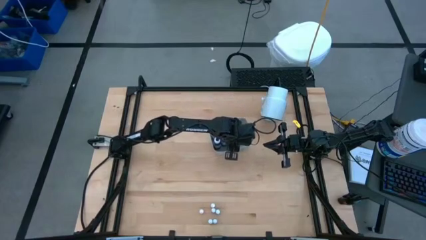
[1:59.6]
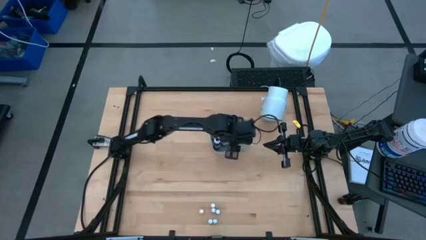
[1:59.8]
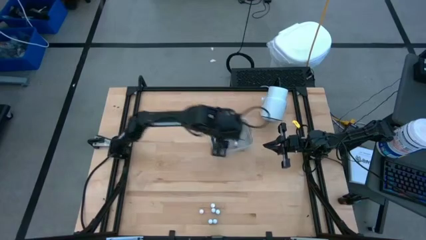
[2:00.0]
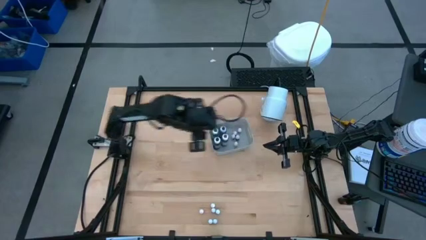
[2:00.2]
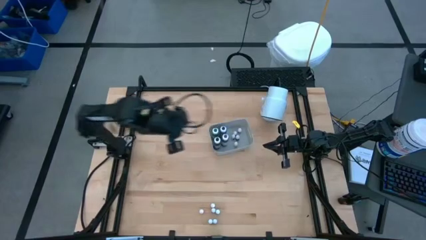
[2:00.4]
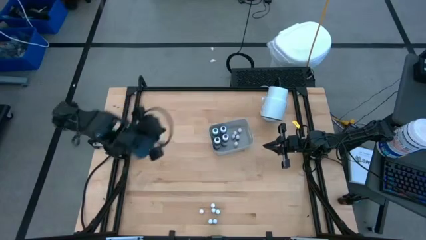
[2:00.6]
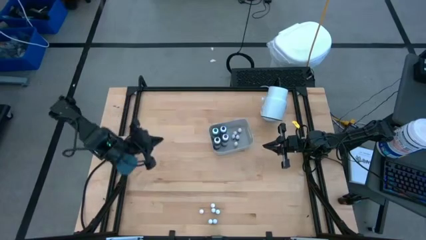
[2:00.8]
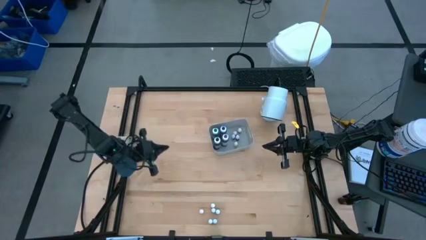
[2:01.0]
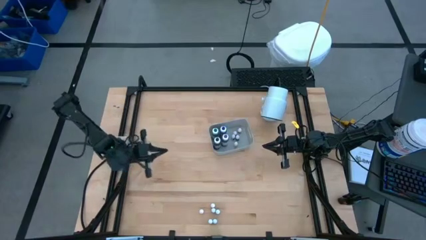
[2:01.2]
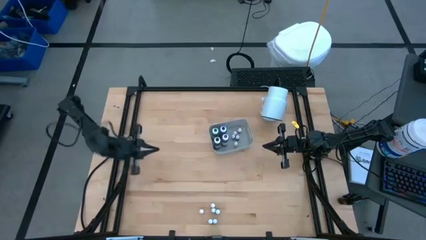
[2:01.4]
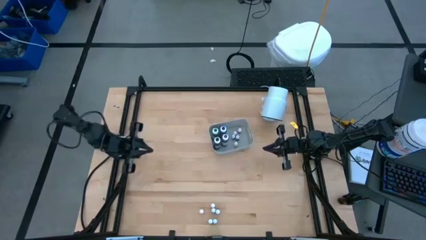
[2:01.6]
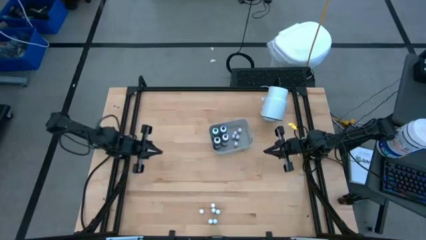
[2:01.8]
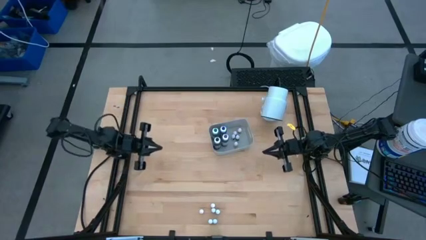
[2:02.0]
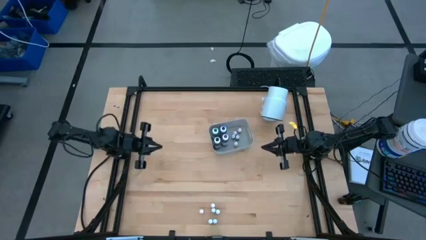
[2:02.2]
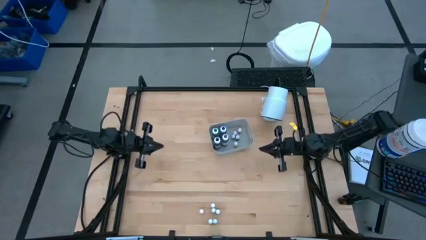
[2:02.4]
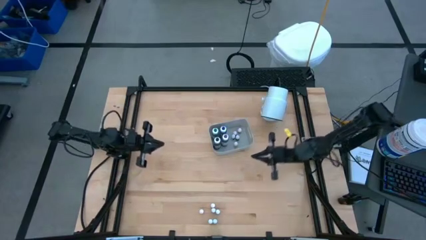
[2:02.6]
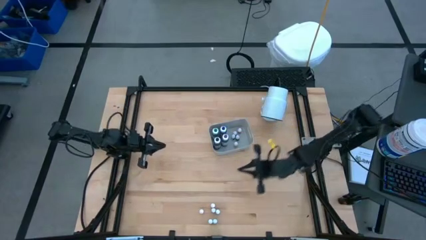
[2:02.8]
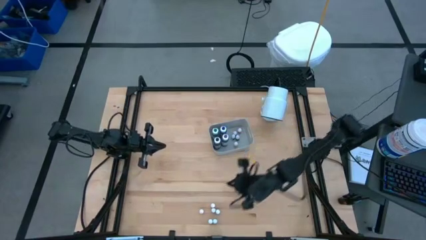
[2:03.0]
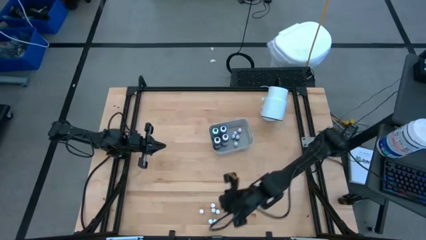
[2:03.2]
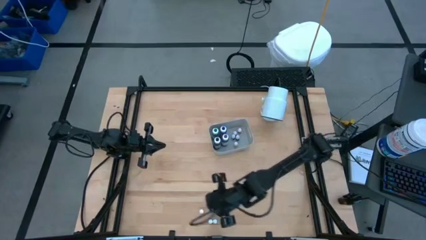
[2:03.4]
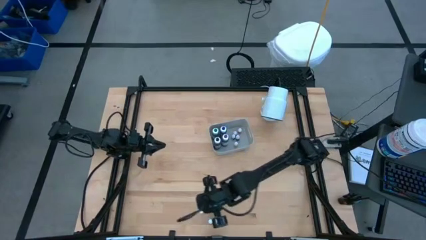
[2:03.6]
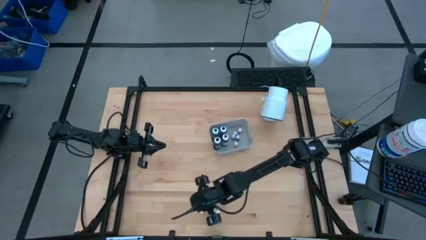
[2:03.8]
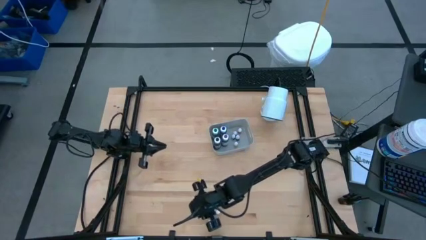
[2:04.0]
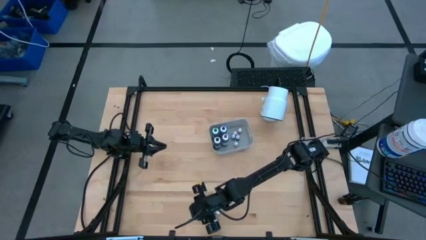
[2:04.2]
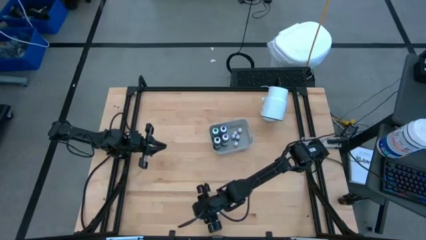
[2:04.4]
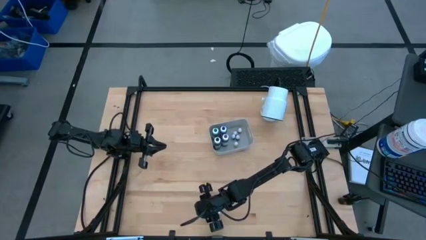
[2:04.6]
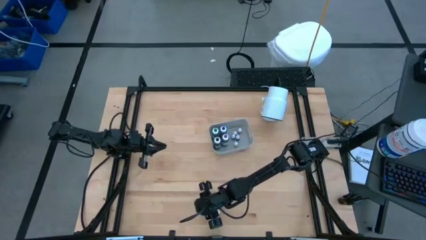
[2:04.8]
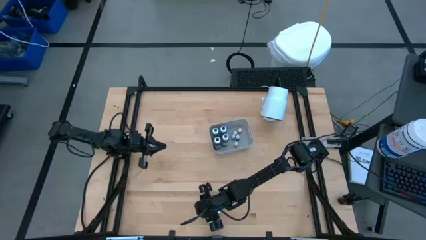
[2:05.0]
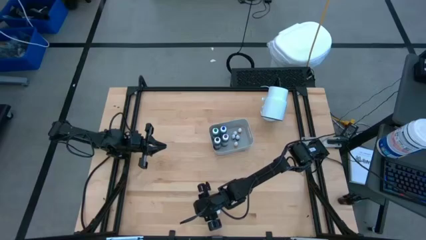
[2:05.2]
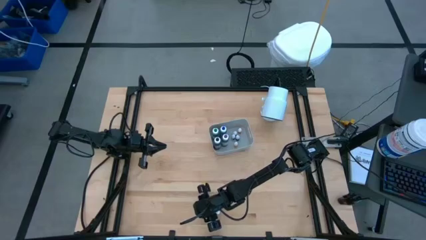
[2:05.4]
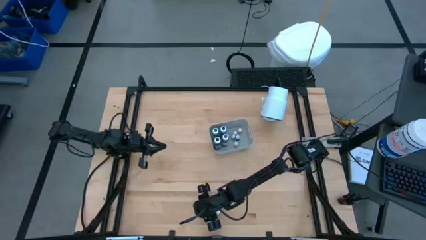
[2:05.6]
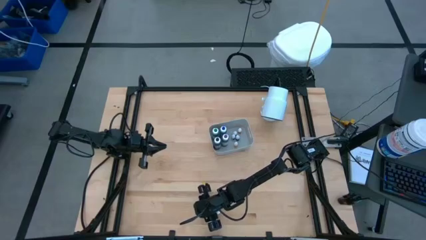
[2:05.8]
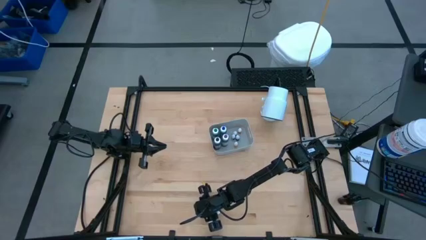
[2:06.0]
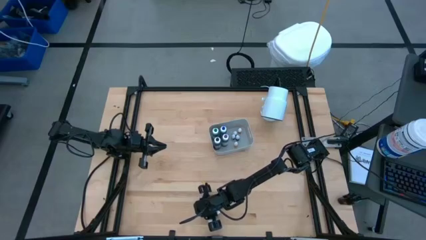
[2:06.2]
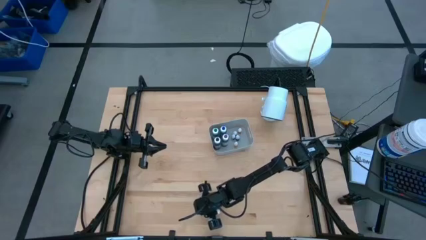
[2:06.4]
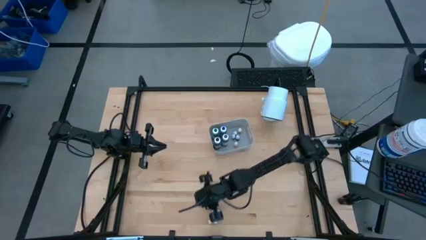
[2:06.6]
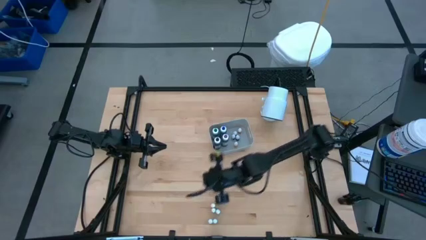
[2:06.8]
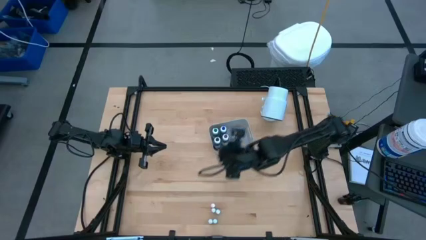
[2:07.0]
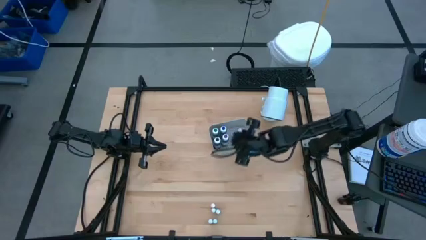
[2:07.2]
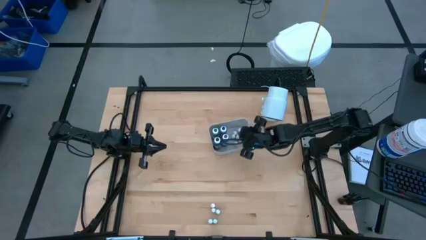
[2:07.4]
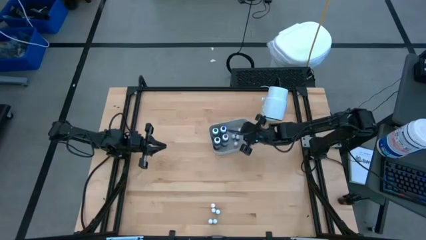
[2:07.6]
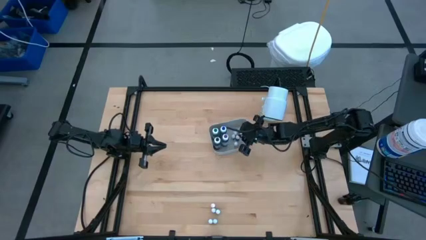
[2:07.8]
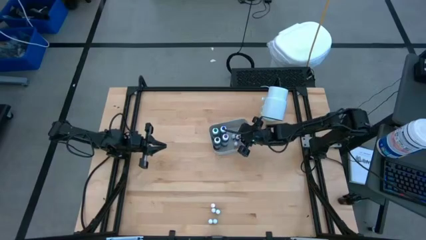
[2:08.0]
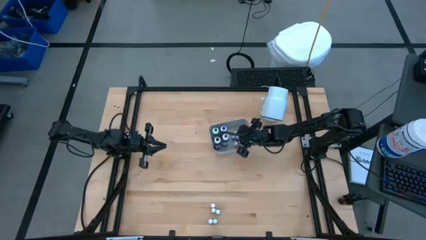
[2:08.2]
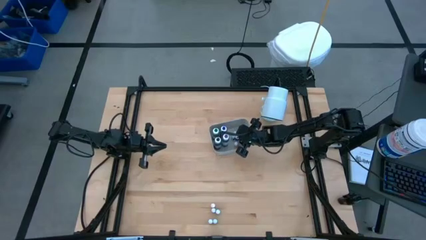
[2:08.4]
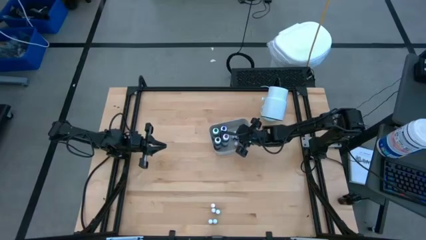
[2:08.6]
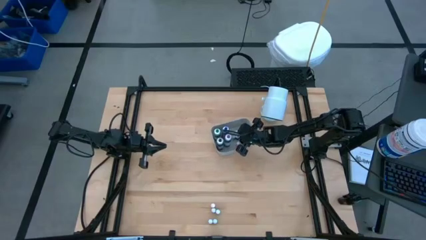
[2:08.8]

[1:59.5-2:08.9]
Task: Pick & Place food coloring
Put the small yellow food coloring bottle into the gray bin

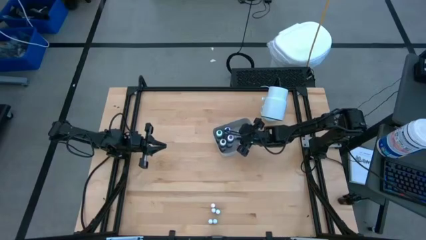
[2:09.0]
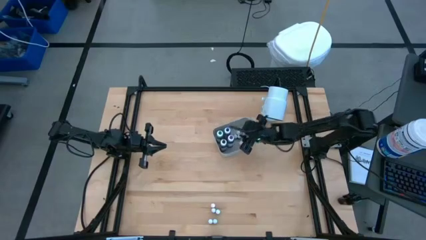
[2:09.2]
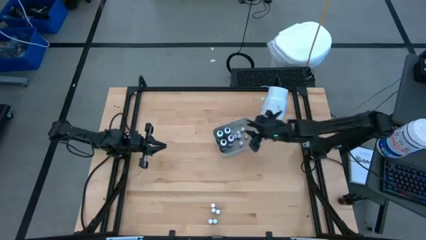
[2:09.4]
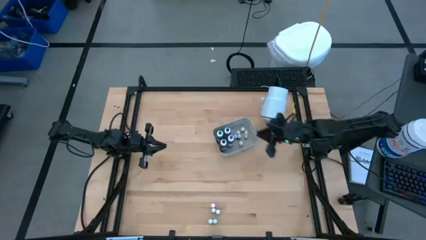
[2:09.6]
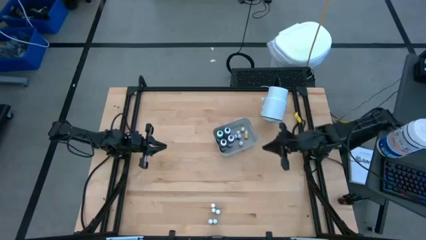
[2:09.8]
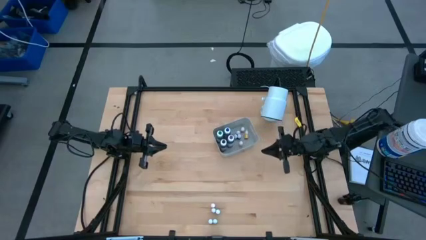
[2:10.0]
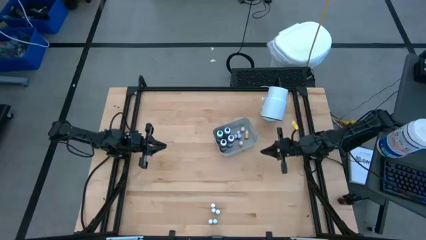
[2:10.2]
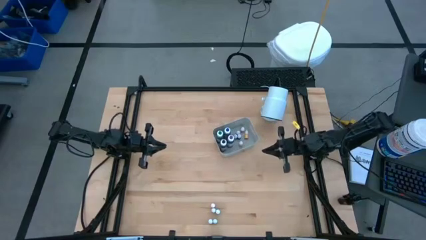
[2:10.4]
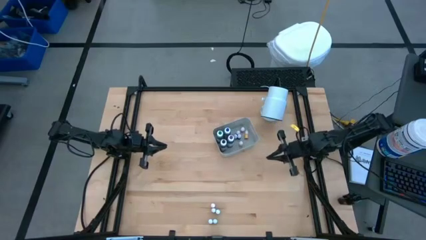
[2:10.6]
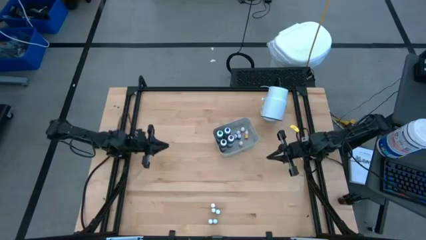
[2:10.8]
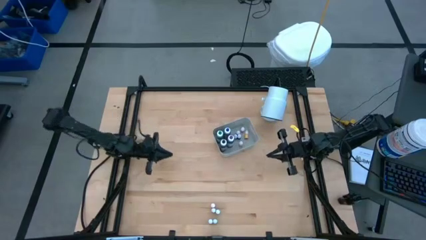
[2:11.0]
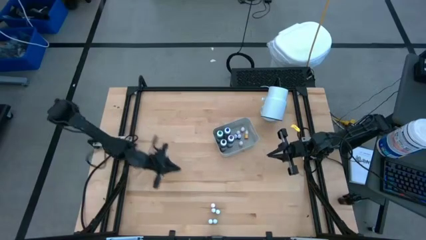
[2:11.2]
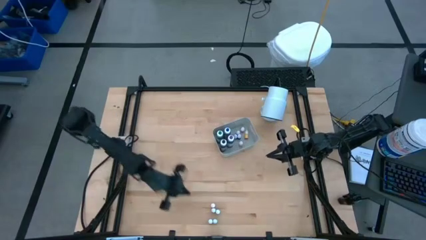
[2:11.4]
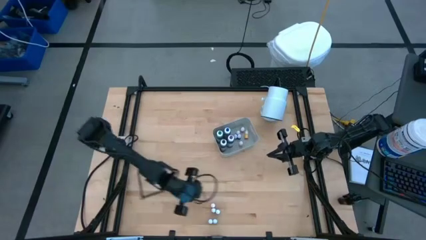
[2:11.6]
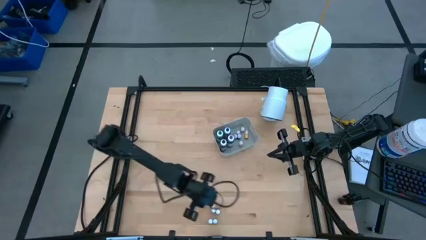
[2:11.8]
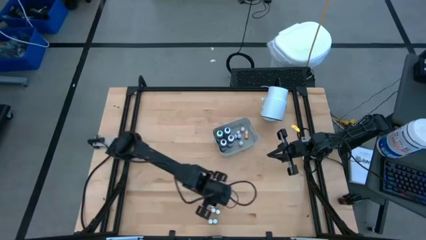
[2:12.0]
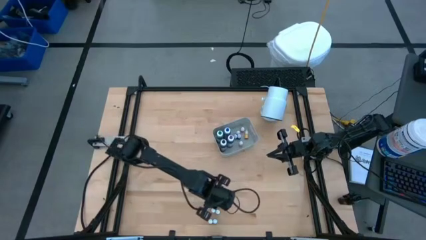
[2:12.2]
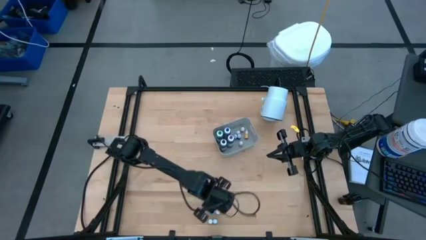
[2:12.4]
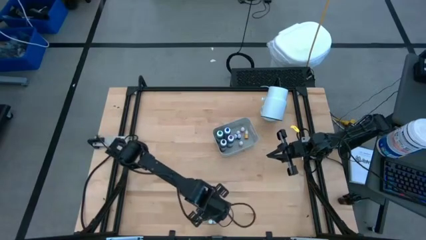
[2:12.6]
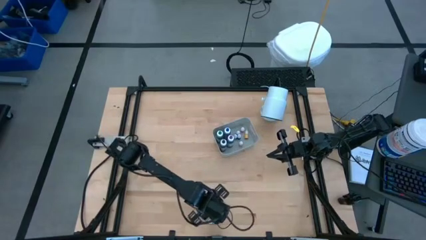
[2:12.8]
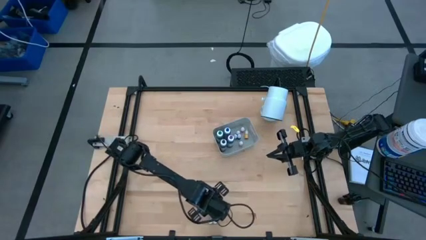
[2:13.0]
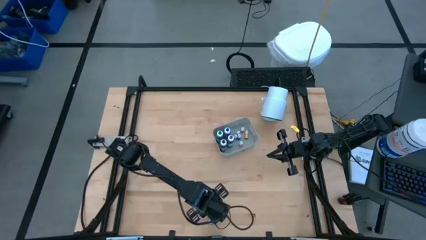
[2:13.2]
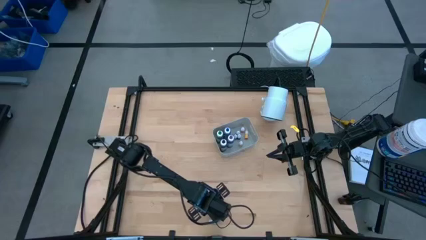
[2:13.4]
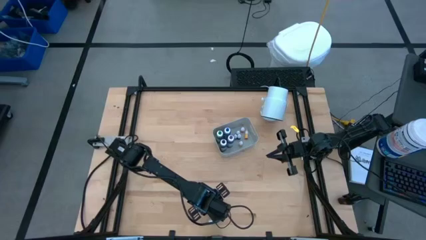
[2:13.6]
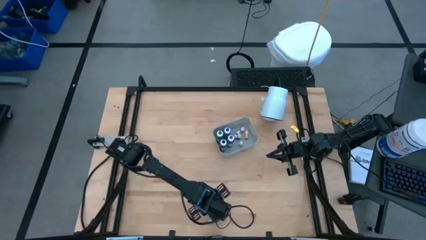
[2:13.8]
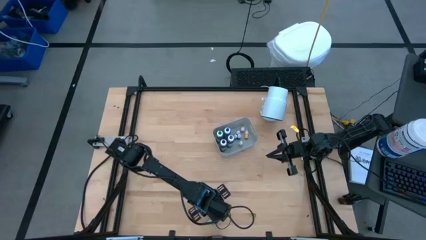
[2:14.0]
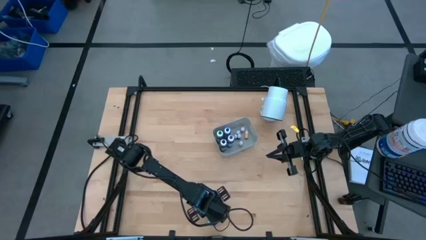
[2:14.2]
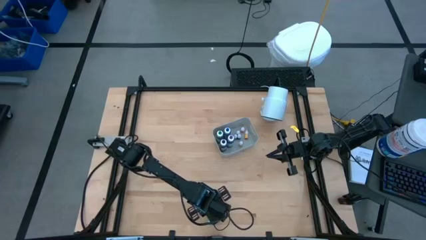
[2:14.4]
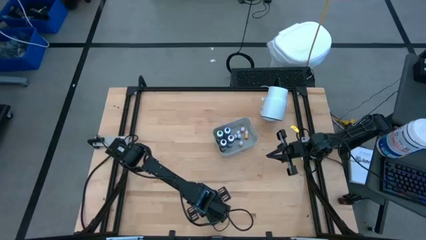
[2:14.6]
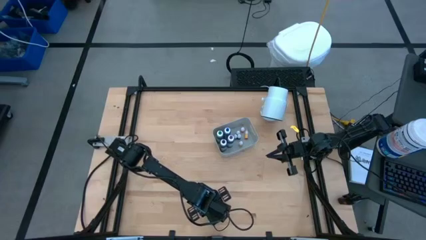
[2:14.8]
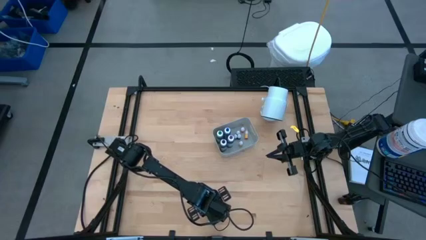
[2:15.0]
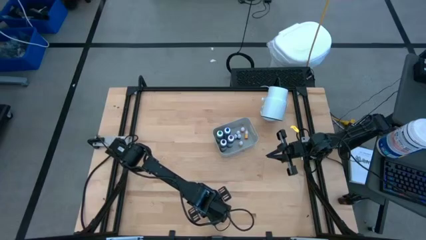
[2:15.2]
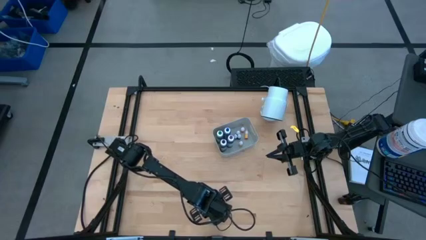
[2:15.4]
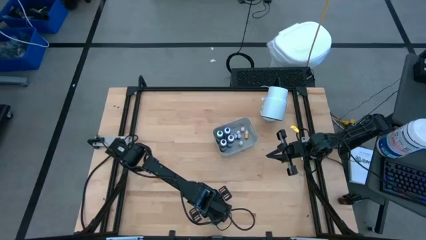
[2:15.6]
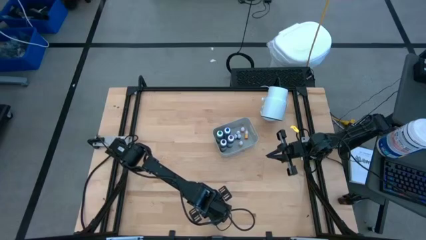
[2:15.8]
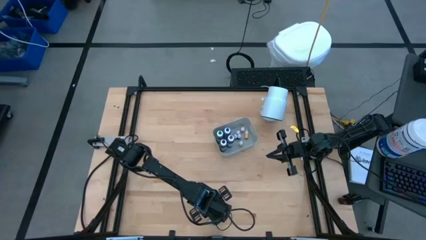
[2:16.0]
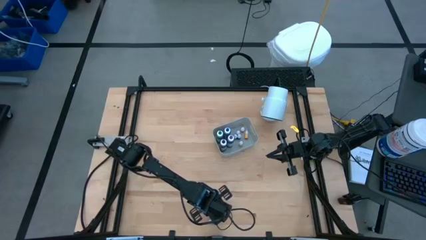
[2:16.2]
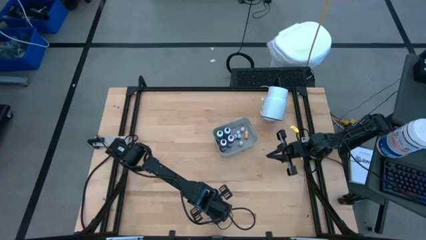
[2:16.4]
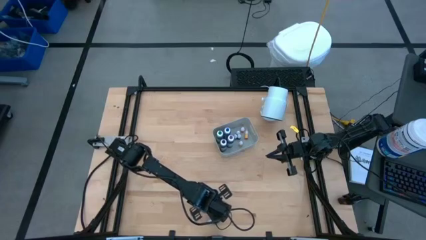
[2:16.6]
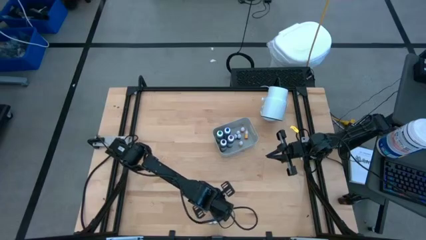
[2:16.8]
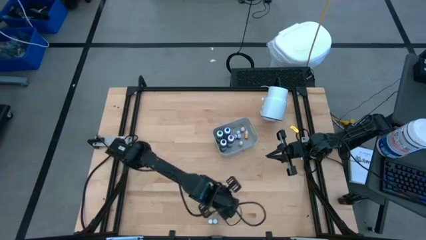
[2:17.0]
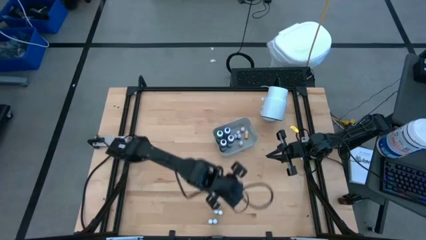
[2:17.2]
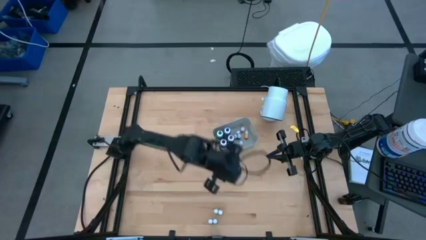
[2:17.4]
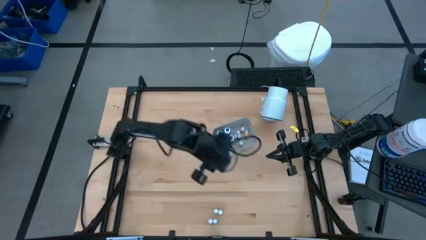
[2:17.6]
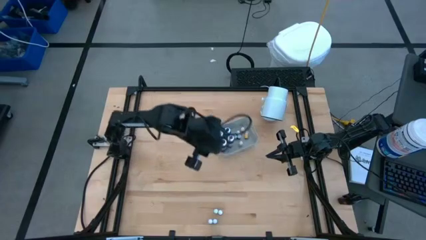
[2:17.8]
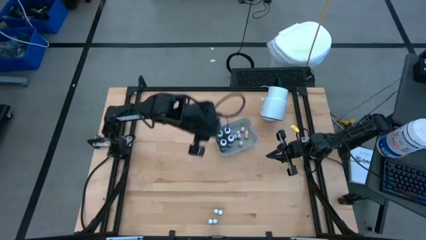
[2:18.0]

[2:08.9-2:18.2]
Put the small yellow food coloring bottle into the gray bin
